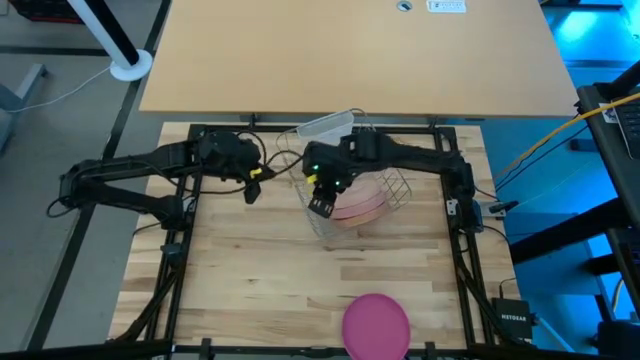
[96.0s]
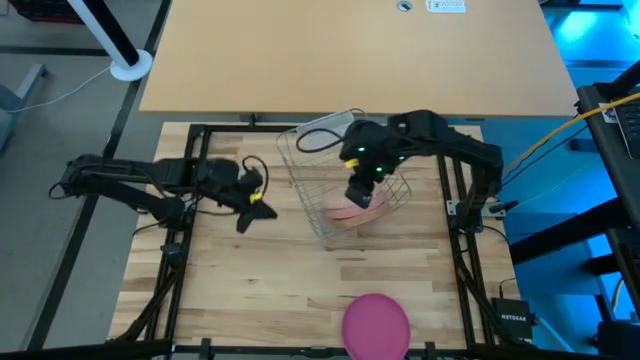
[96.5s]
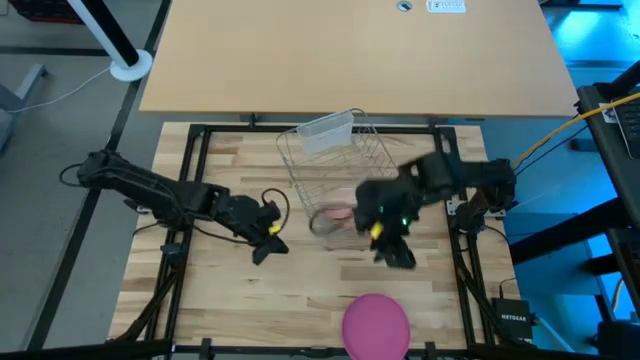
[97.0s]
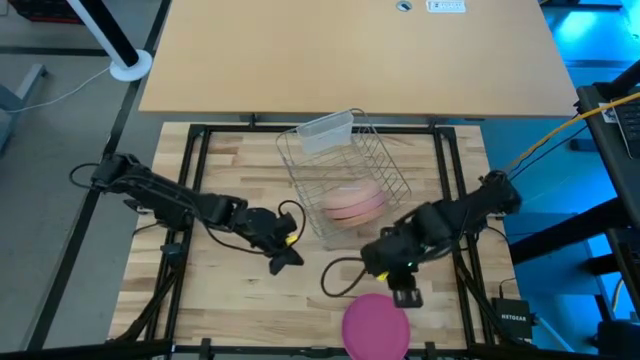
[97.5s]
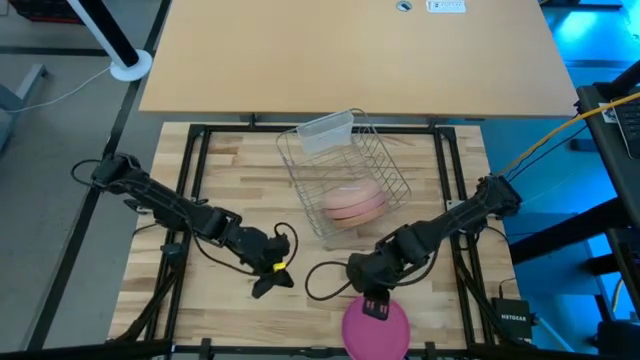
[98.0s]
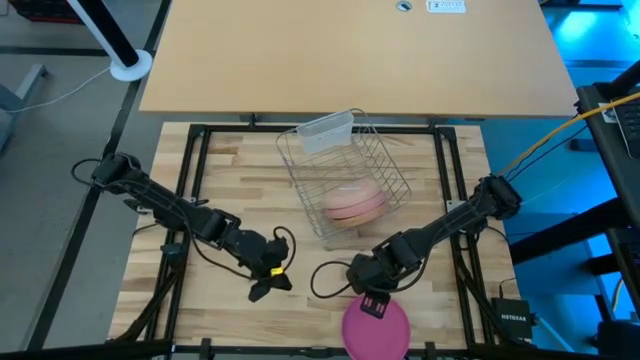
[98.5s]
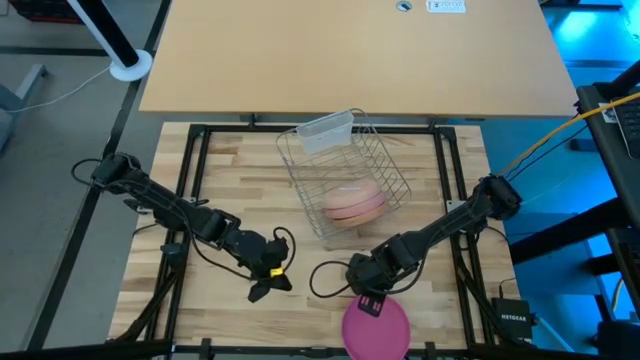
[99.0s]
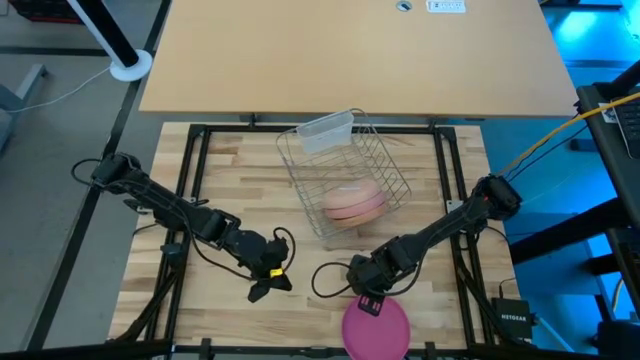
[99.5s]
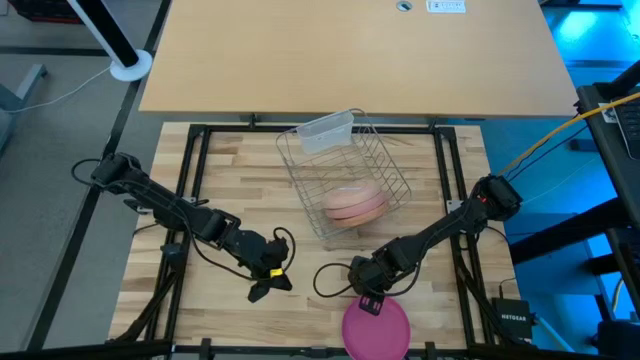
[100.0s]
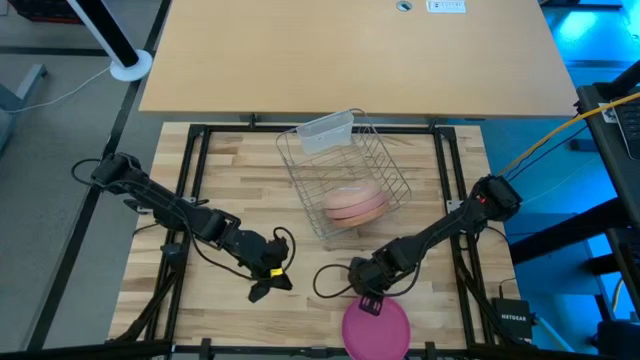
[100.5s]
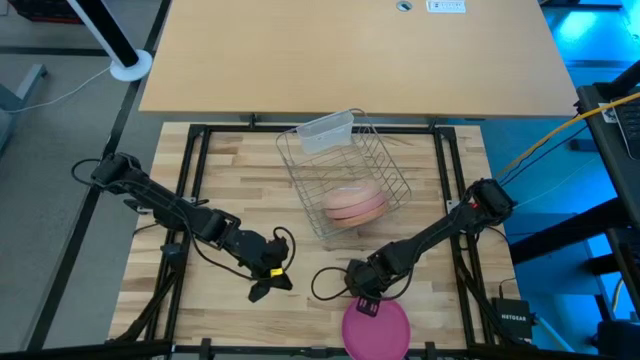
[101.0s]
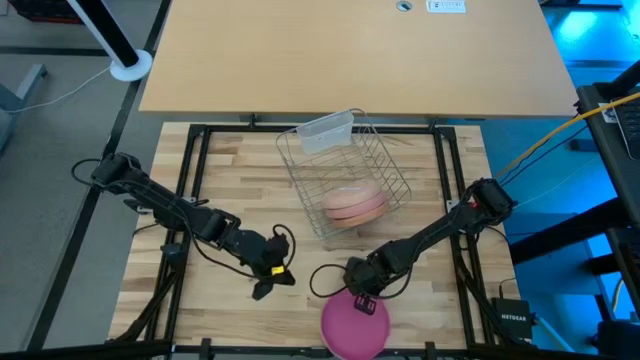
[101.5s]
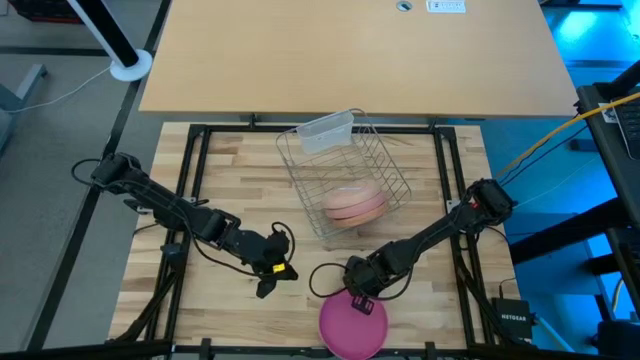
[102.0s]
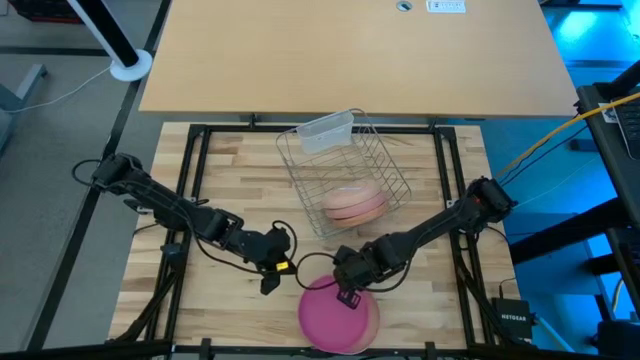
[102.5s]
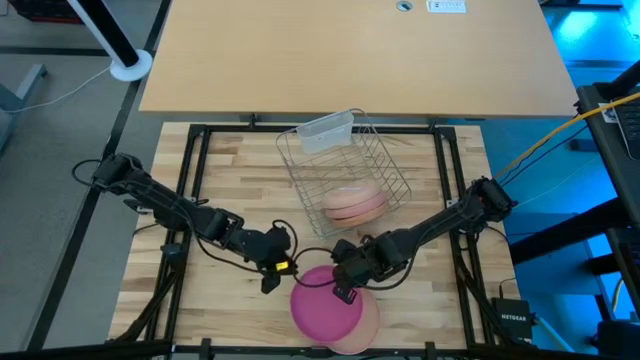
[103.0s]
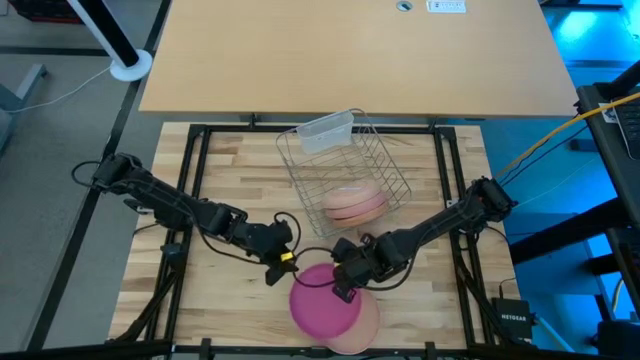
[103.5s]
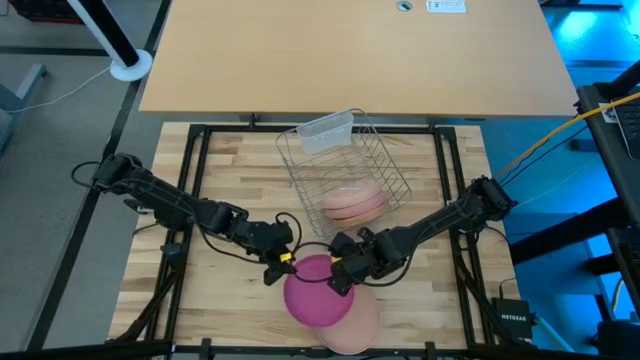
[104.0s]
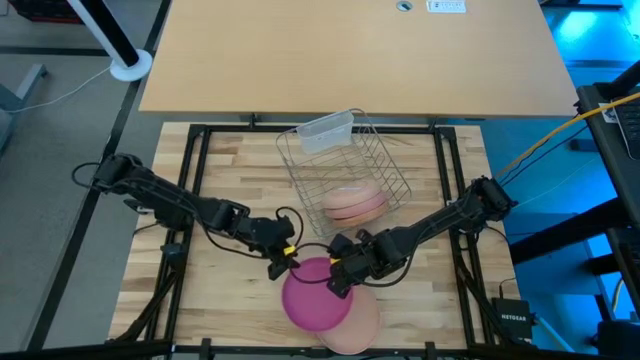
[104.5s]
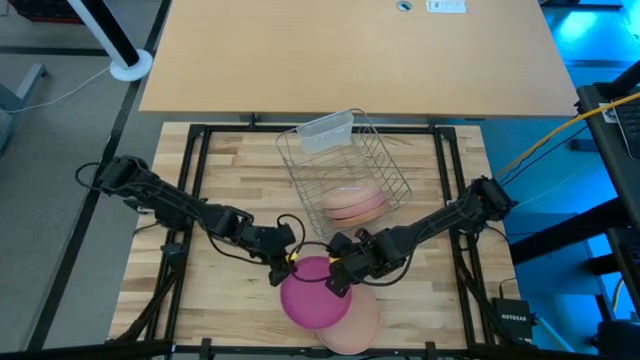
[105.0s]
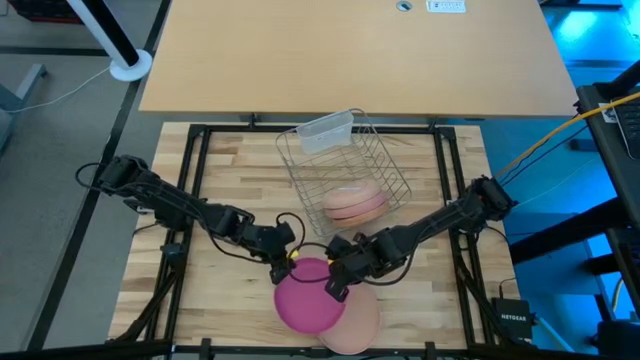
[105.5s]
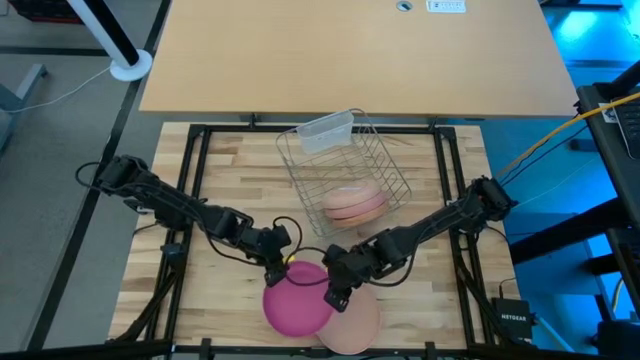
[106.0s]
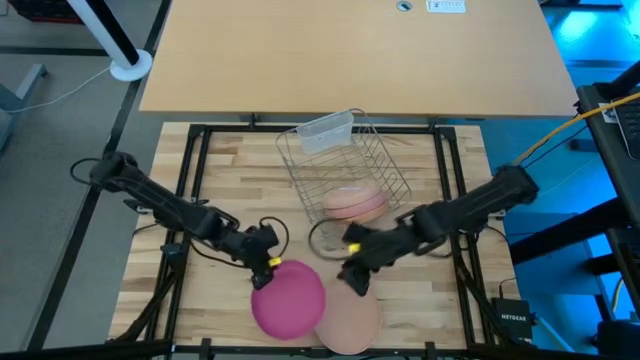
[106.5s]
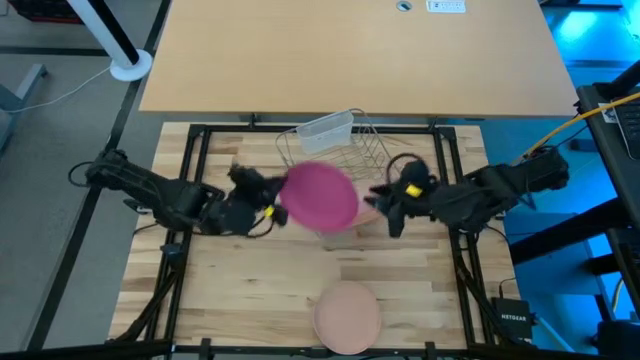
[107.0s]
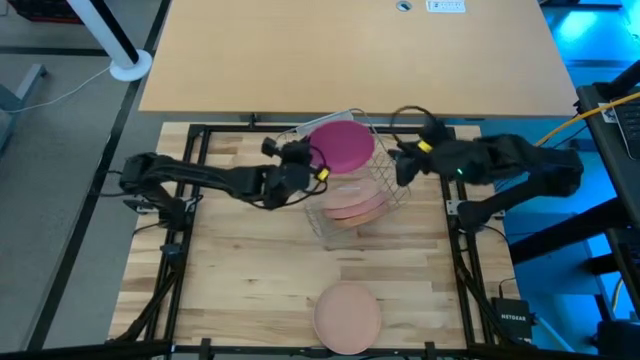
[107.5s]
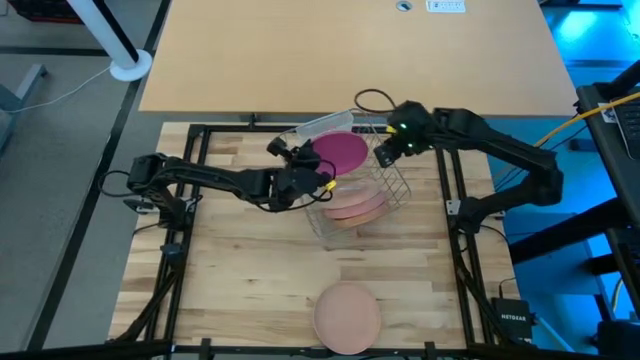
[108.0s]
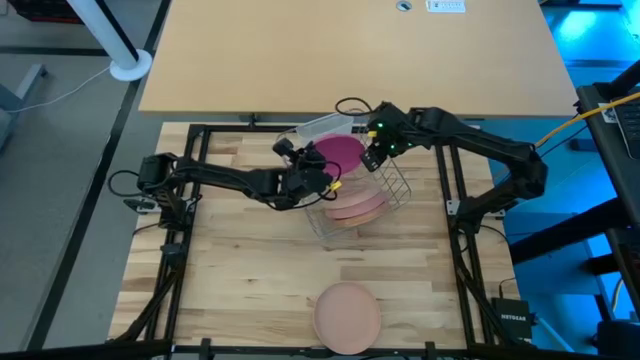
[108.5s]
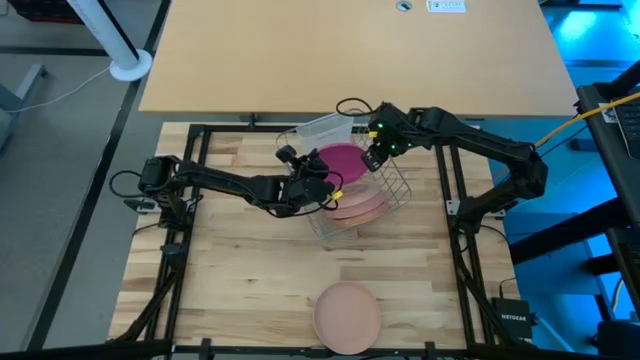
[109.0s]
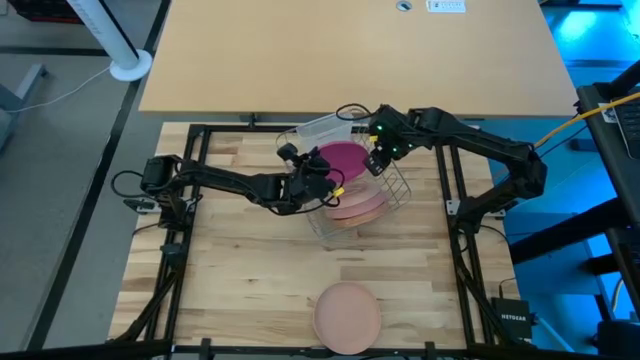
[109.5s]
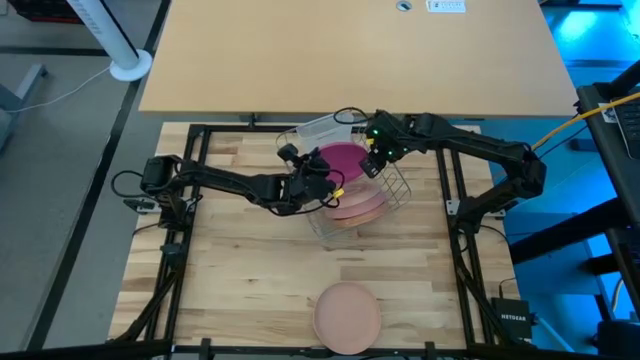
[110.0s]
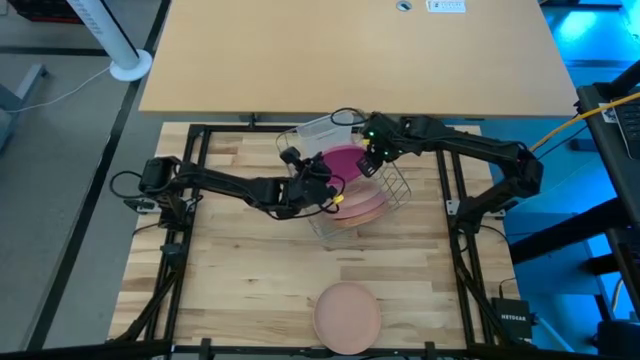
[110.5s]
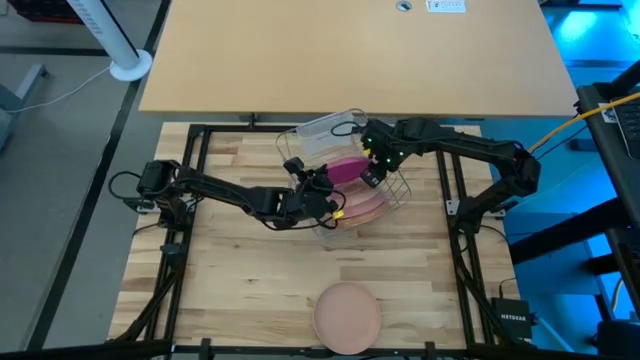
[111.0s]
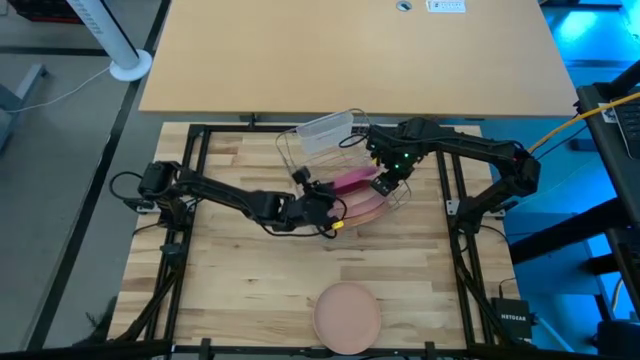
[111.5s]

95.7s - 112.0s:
Task: Sort dishes
Put the pink plate in the dish rack

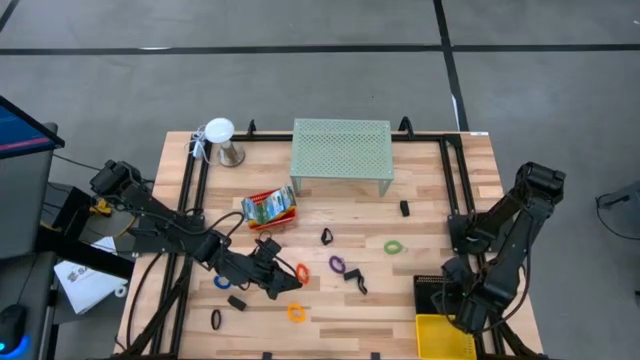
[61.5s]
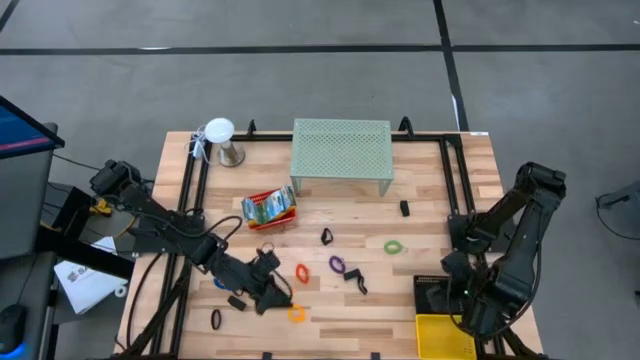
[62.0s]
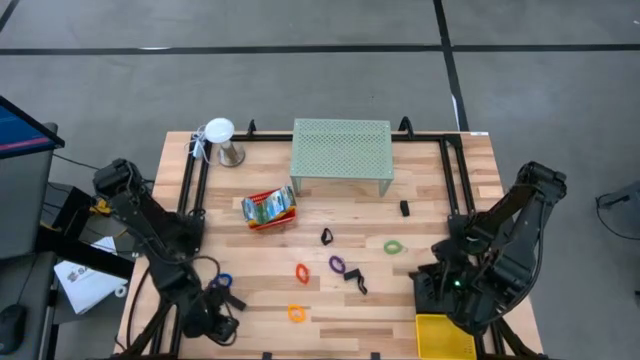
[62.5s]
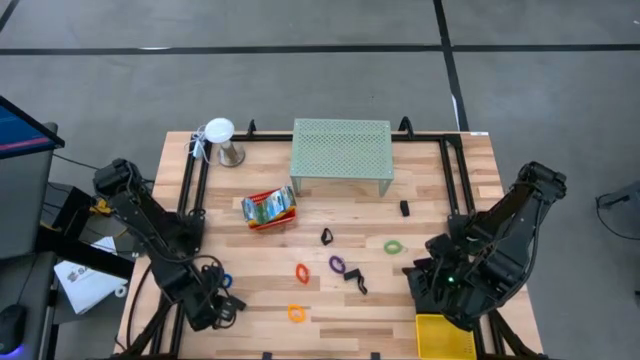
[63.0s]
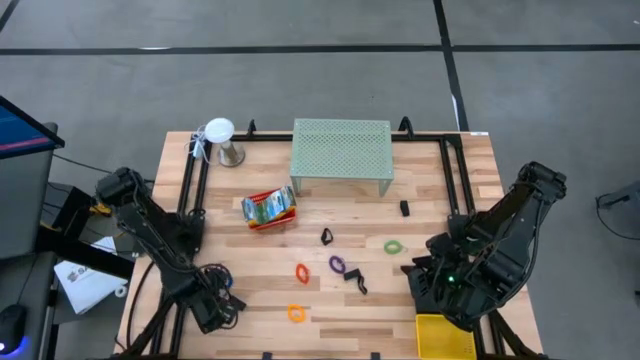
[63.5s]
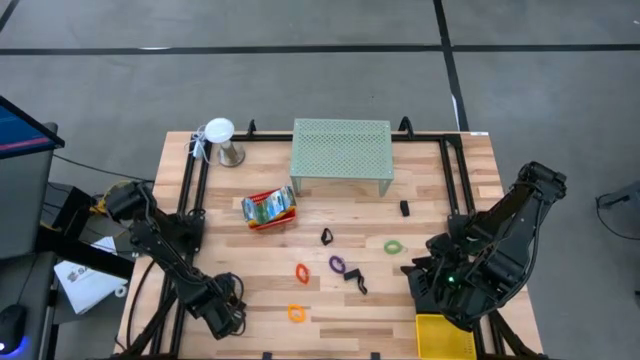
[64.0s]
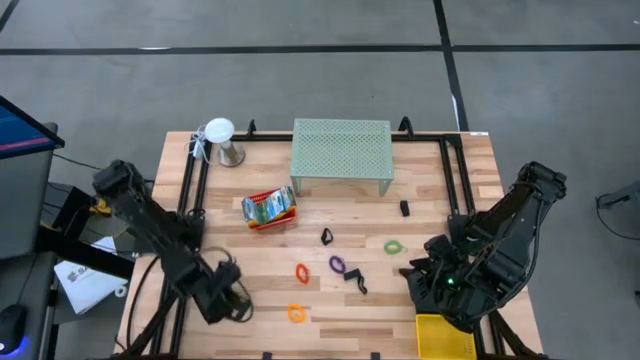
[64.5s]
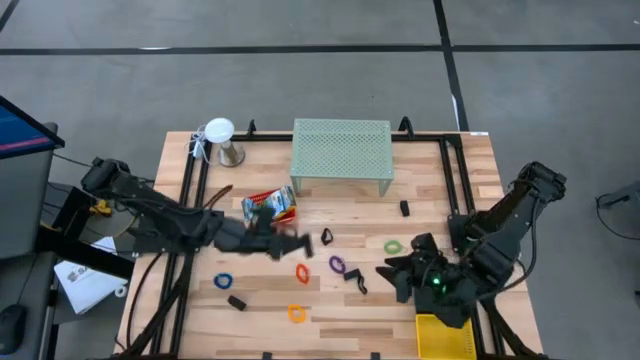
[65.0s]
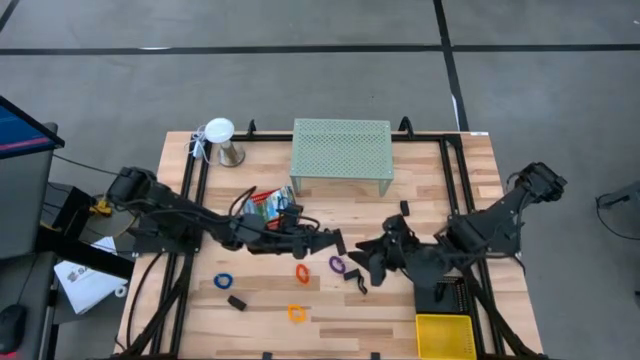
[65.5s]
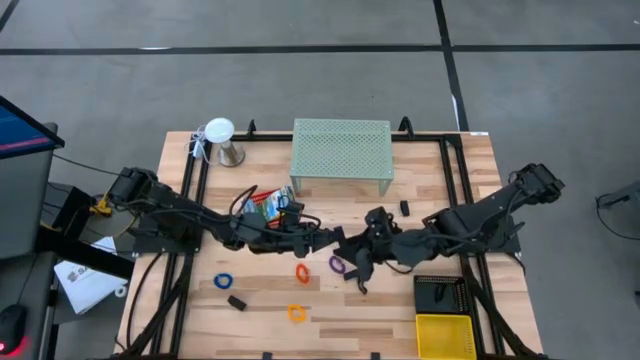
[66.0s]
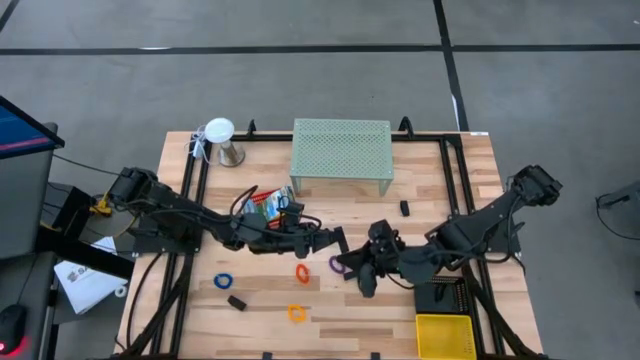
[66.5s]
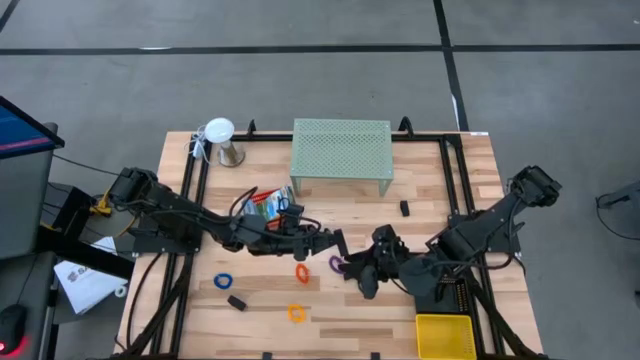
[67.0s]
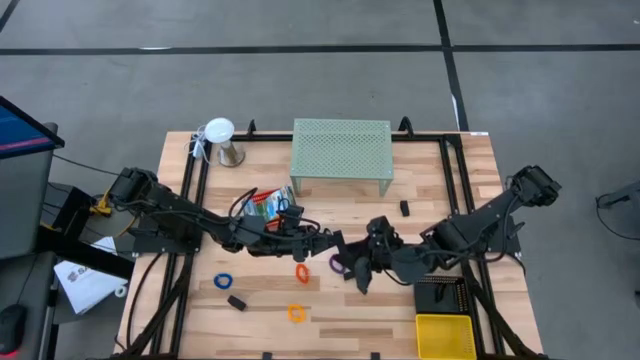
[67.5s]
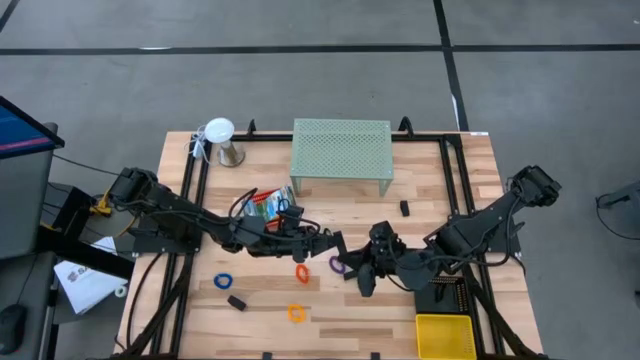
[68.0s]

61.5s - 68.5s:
Task: Pick & Place Office Desk Supplies
Put the black rubber band into the black bin
